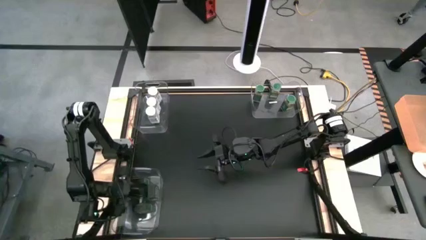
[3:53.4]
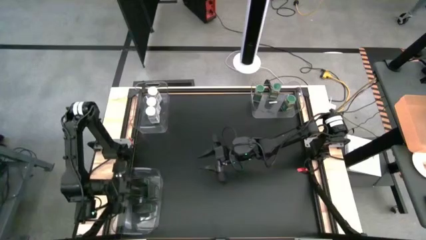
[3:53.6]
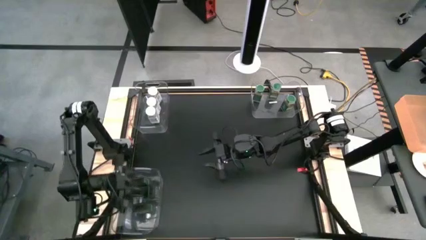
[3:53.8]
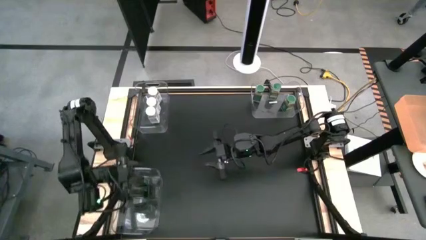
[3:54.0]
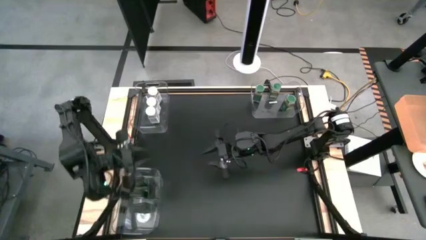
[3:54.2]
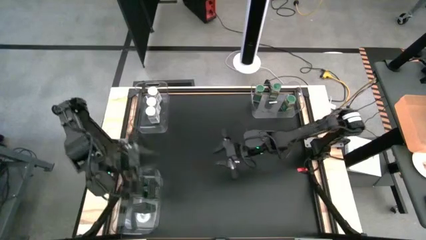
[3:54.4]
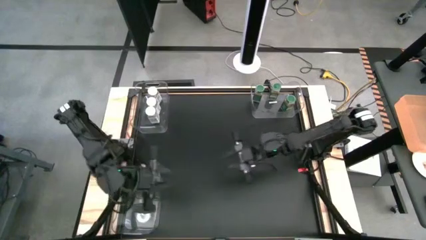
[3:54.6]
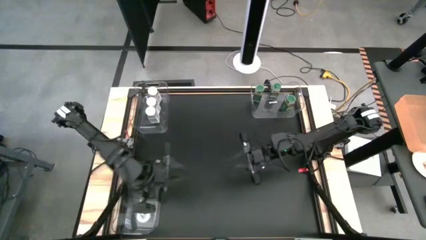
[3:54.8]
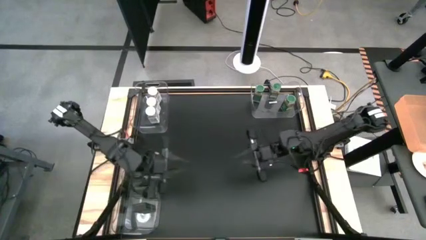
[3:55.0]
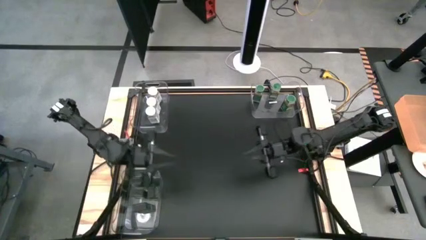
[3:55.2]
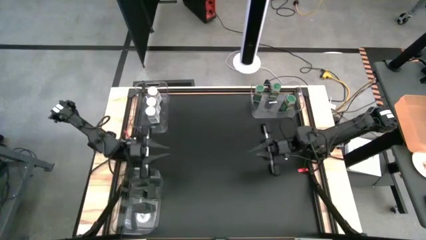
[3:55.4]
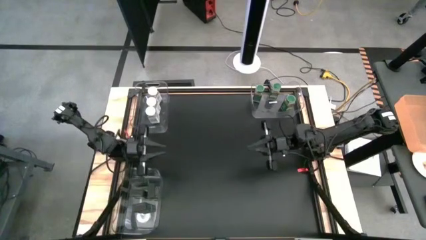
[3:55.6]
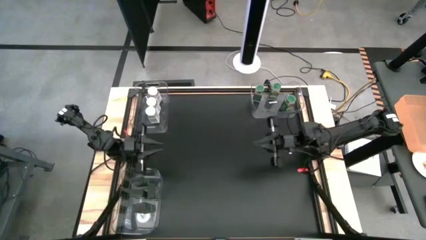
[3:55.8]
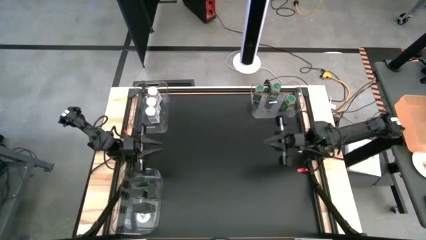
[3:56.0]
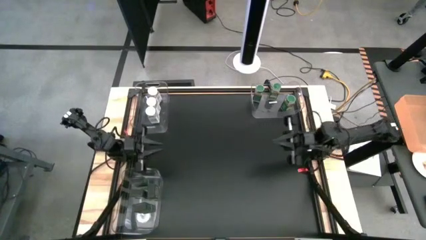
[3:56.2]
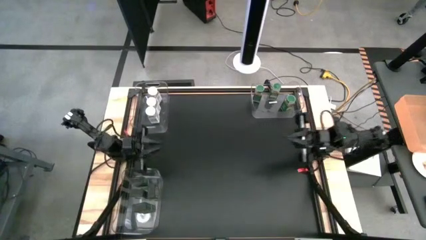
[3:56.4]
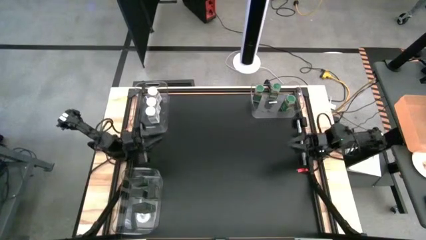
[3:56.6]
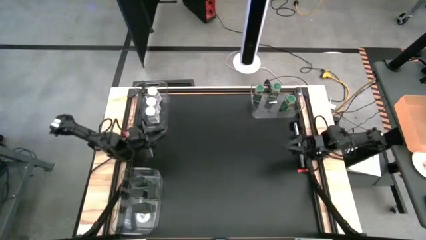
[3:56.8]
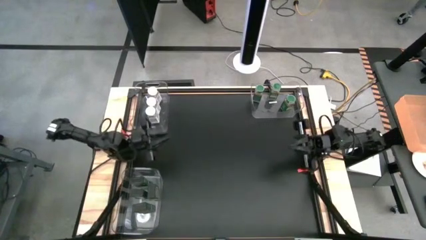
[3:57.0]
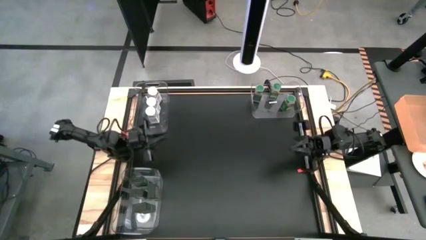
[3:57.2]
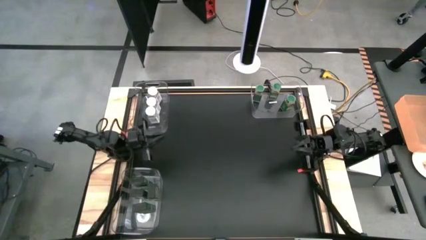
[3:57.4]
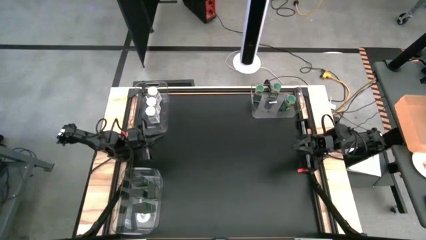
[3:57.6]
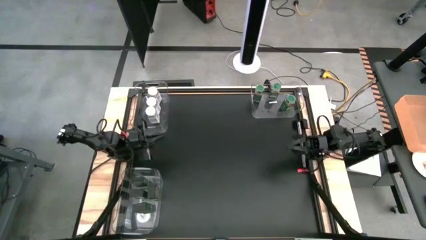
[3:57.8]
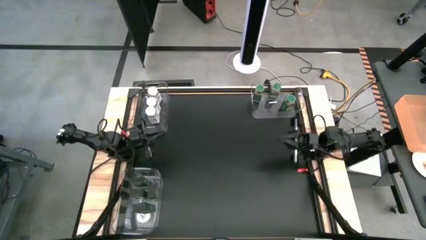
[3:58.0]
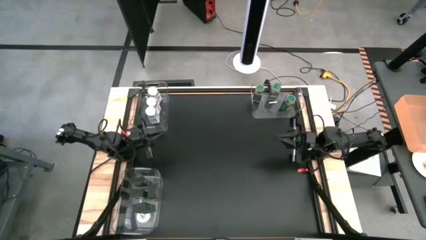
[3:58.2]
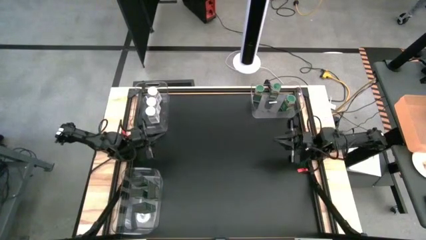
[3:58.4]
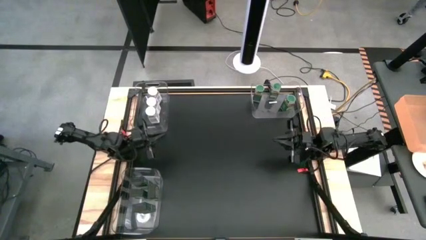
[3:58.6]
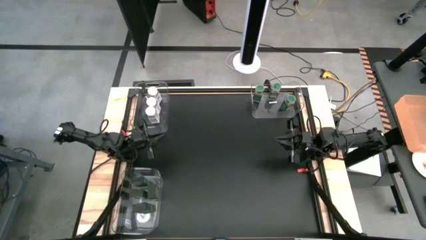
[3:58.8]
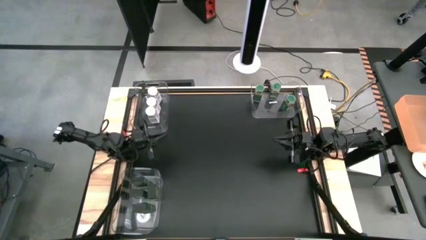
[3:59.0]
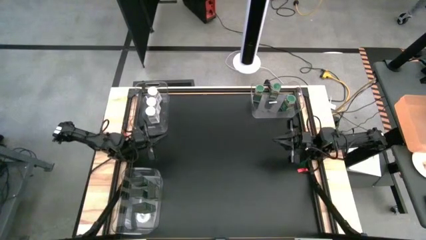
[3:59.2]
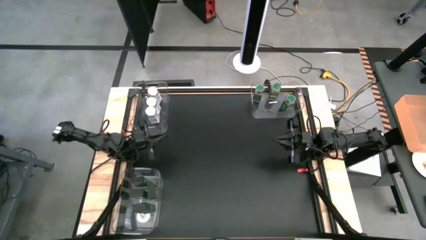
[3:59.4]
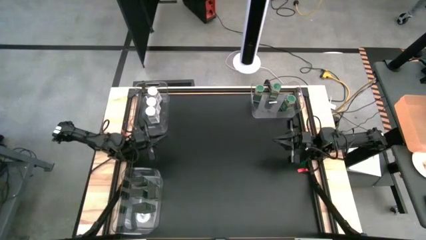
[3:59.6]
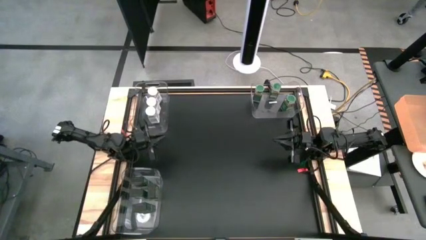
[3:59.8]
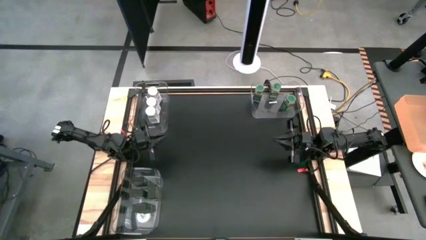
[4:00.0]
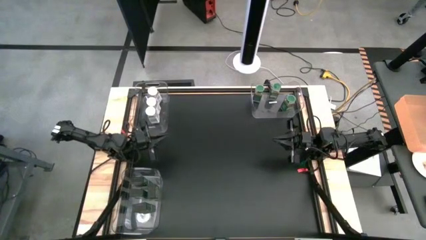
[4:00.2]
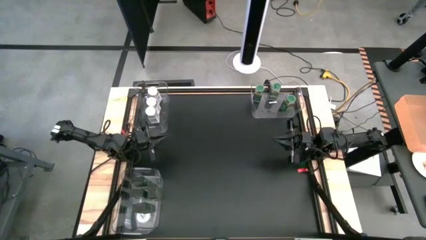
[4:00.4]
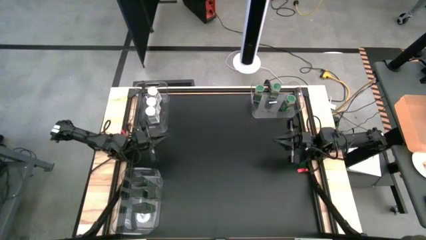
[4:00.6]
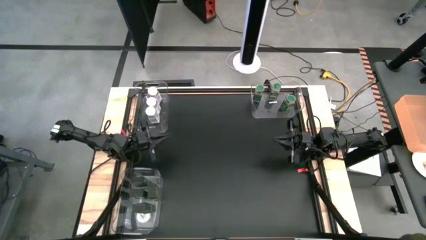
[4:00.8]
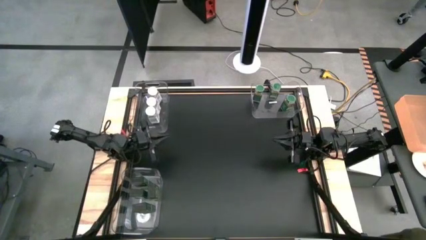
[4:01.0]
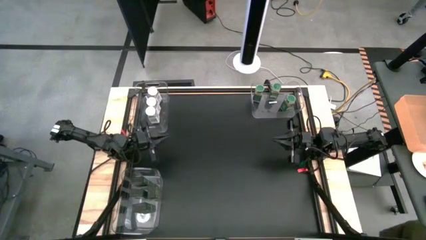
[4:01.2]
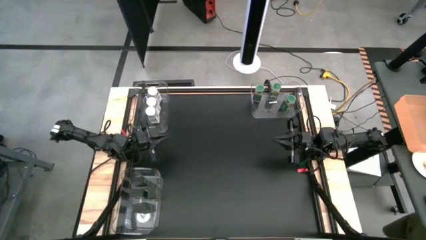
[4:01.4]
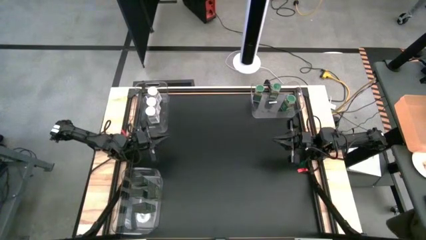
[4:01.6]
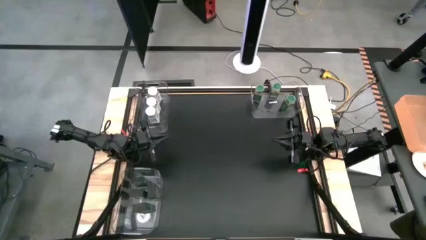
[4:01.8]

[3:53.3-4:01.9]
Task: Sort spices by type
Return to Home Position

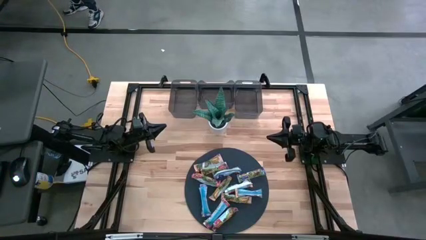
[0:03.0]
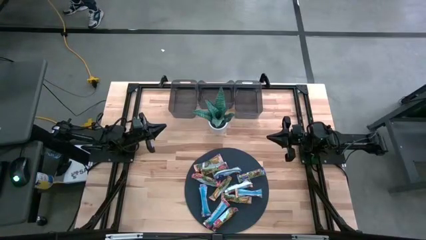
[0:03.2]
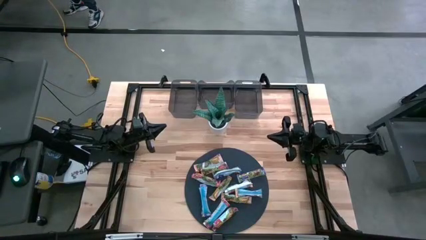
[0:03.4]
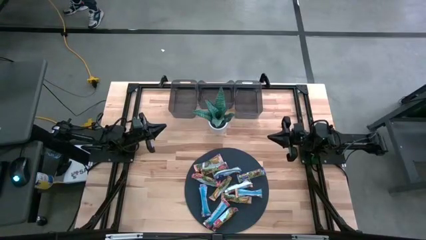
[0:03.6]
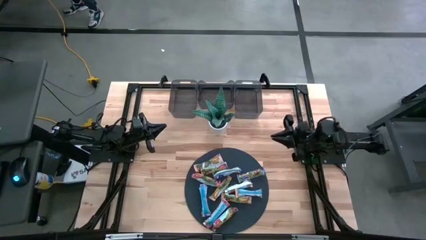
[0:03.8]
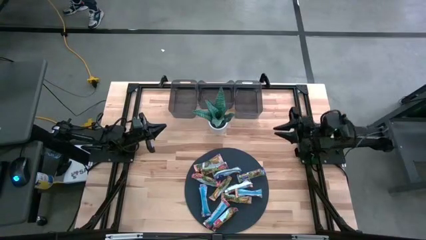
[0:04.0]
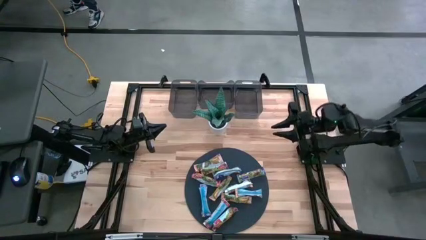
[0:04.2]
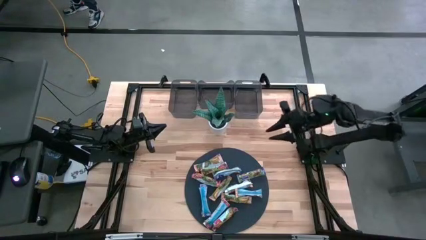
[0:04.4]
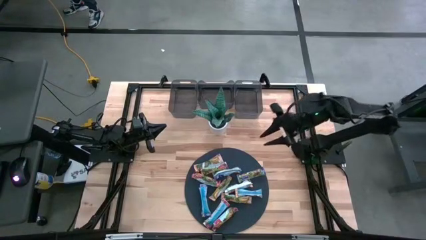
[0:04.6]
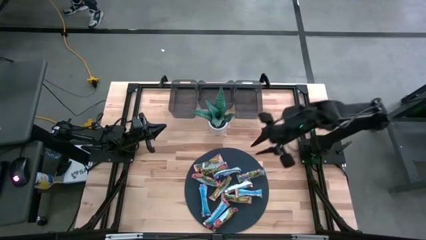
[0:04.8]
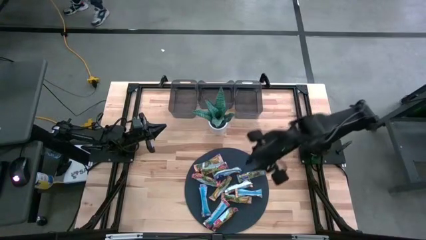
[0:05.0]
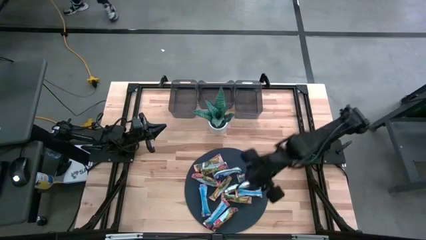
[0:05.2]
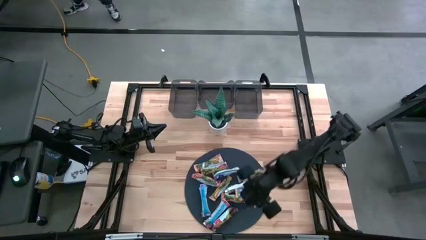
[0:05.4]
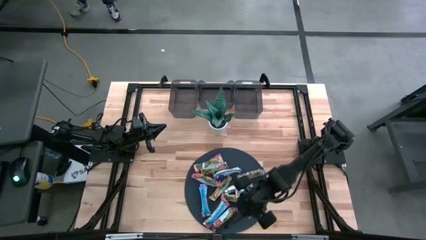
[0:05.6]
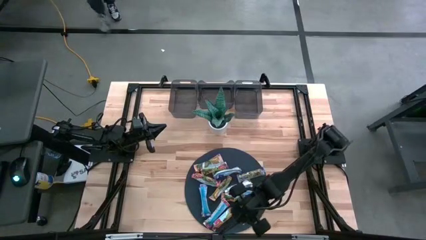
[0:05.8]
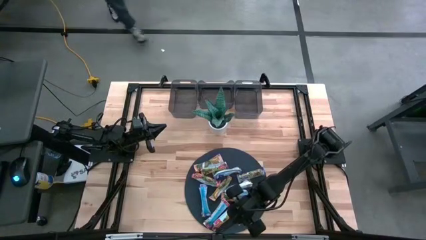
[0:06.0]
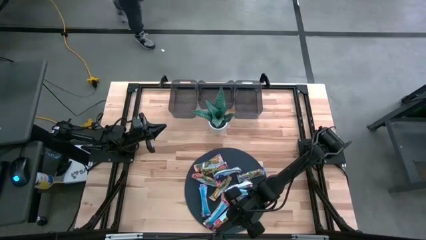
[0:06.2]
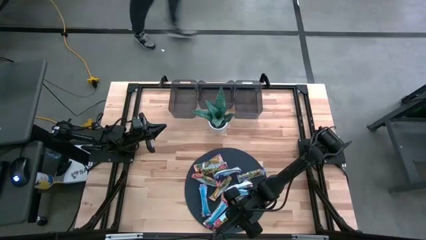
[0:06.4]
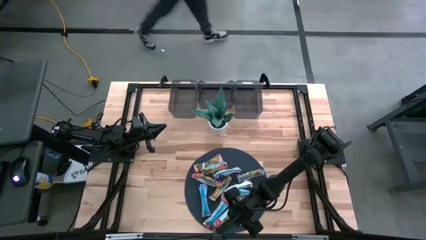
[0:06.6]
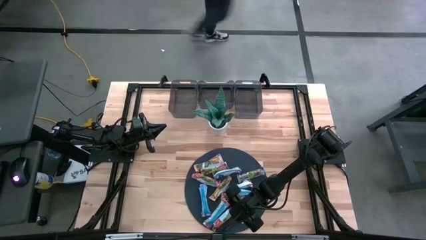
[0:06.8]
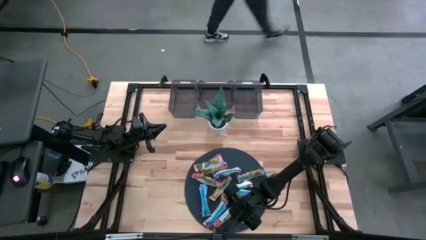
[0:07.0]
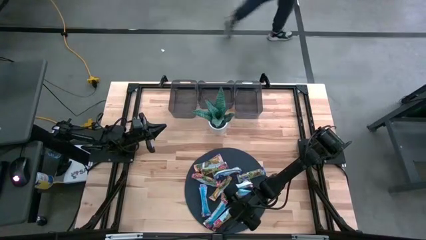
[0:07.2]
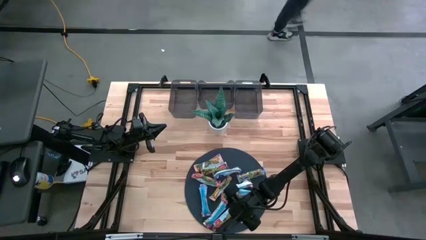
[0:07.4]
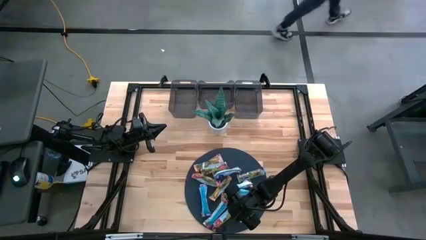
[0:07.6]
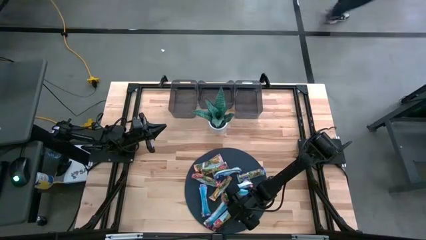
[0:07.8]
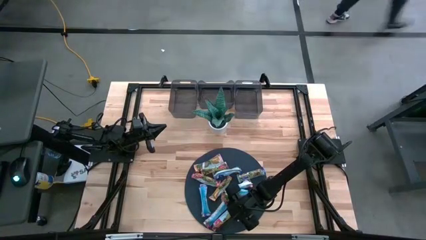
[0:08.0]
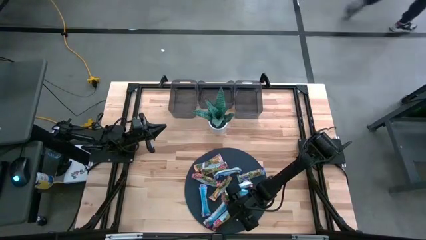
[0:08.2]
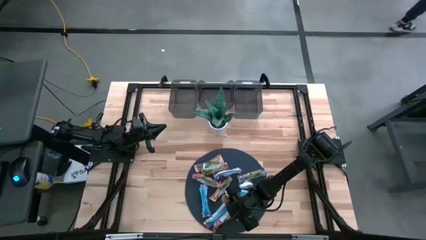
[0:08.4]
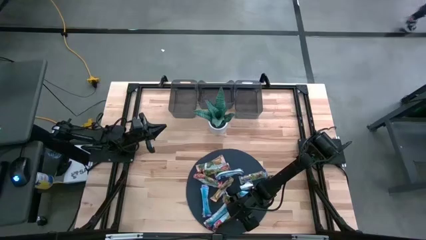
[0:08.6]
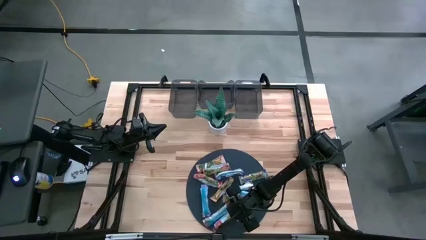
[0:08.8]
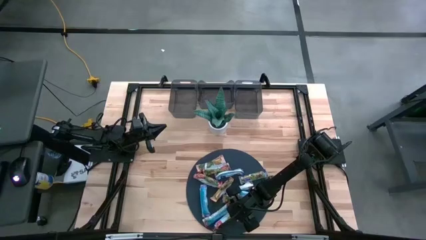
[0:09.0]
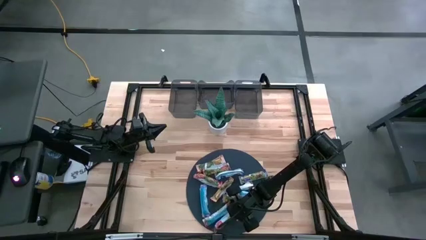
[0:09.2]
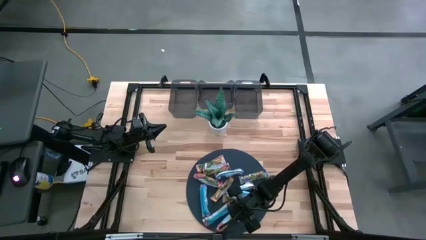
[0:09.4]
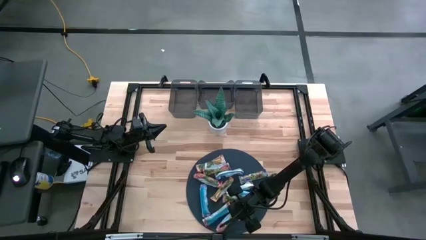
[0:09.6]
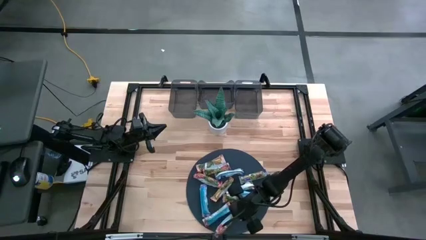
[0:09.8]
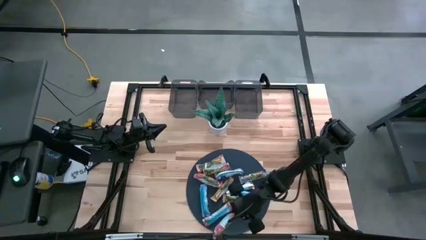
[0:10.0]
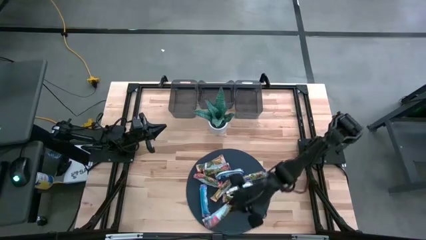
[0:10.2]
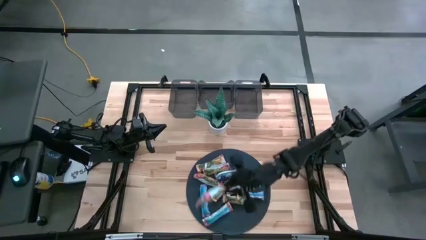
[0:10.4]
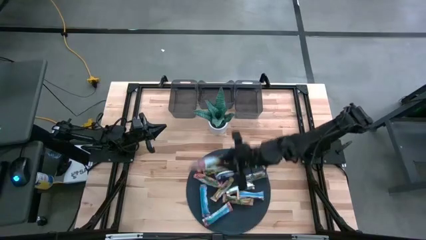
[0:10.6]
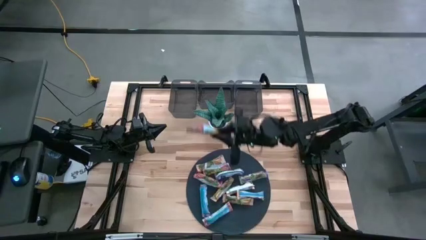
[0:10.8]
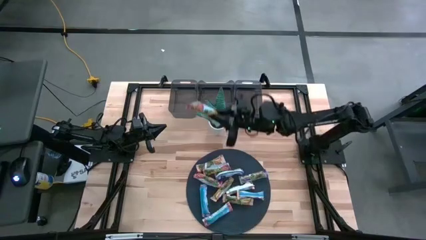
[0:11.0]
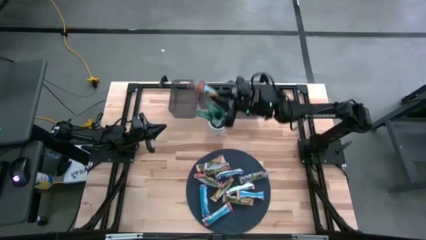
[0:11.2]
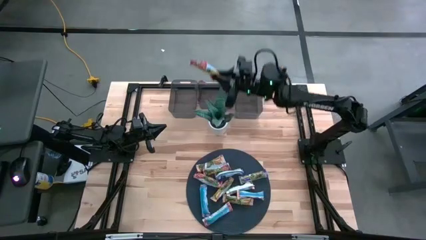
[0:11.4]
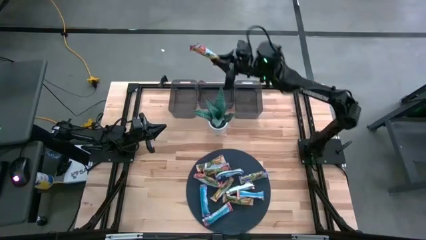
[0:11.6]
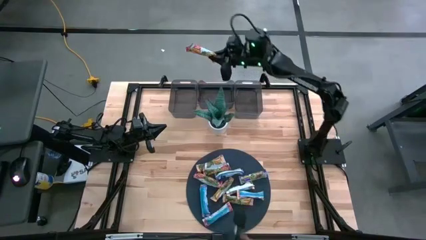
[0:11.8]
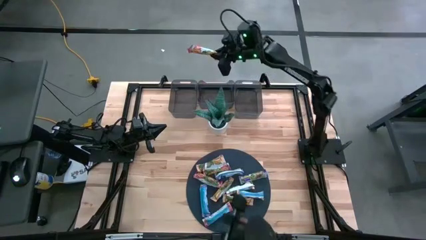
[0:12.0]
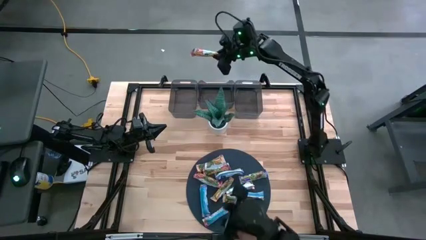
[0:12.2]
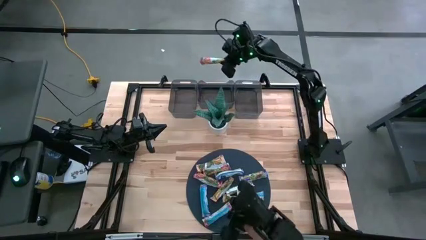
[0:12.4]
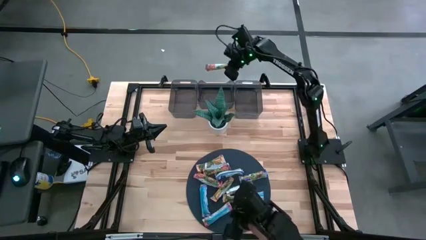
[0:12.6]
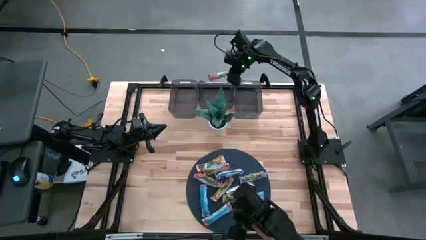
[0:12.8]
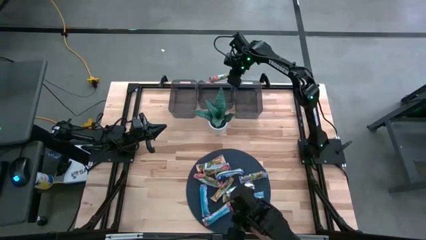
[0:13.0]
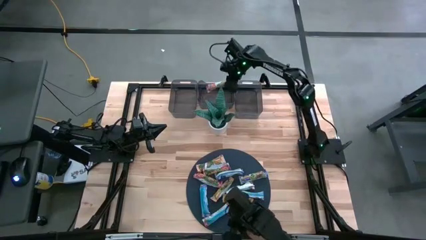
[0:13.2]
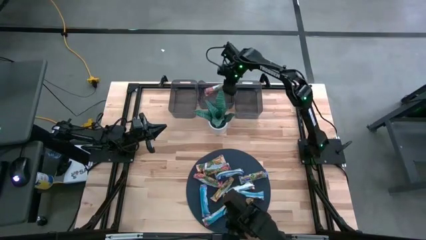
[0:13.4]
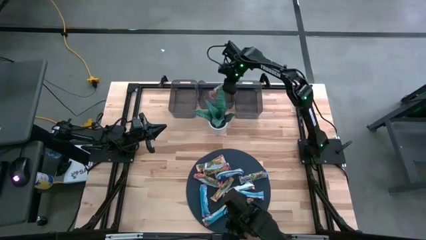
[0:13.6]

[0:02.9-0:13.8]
Task: Pick and place Granola Bars by type
Put the red granola bar into the middle black bin
